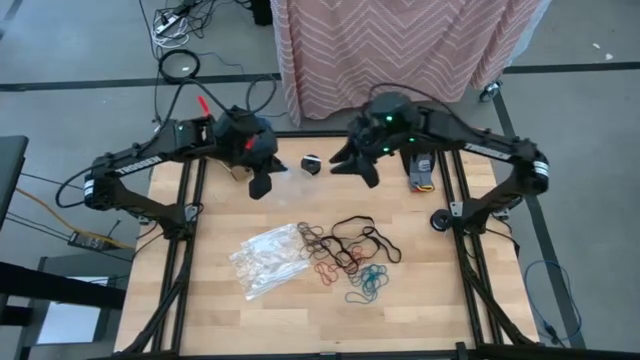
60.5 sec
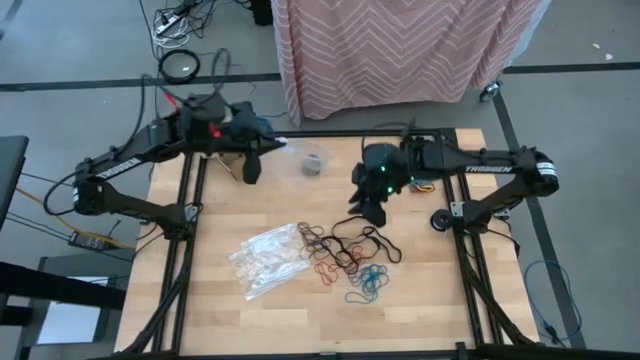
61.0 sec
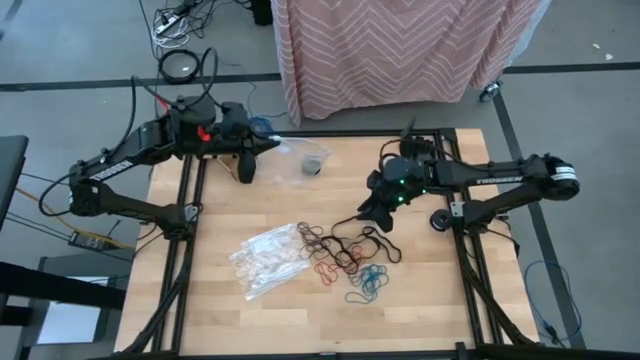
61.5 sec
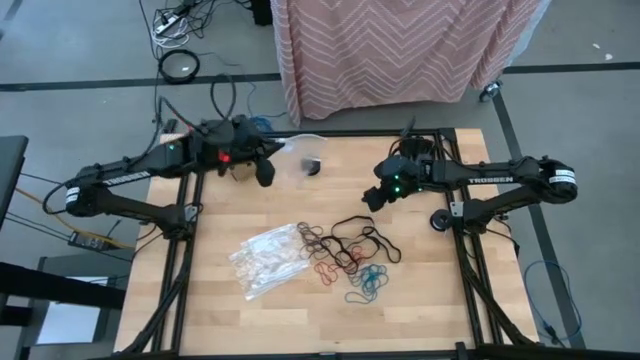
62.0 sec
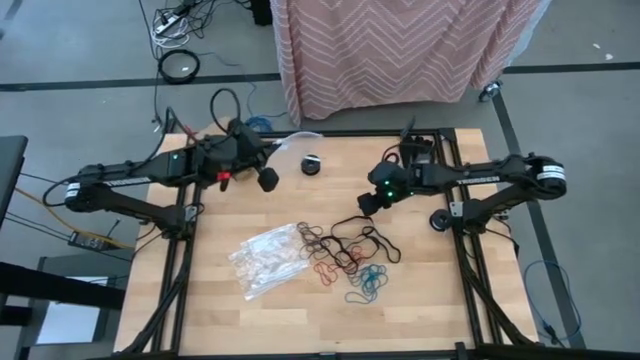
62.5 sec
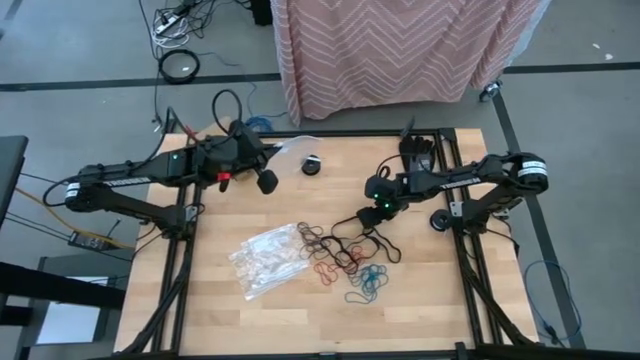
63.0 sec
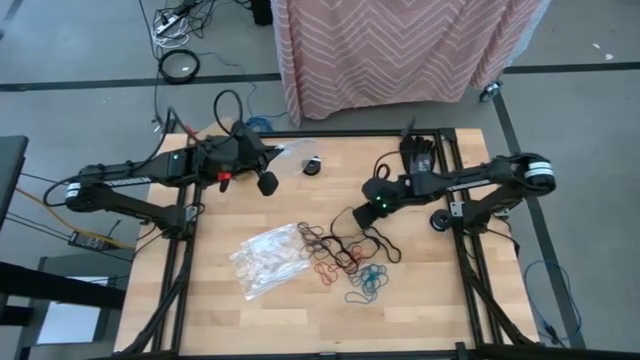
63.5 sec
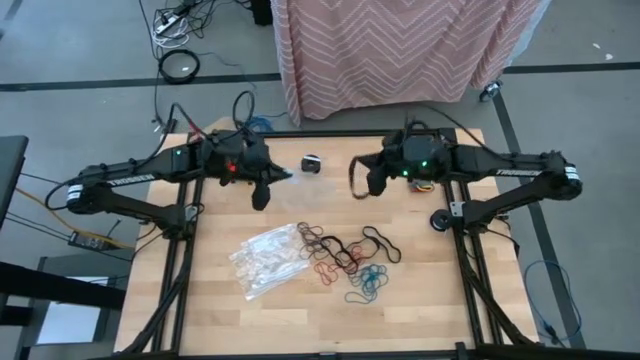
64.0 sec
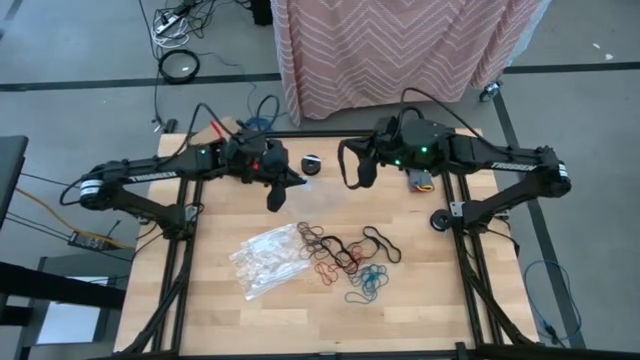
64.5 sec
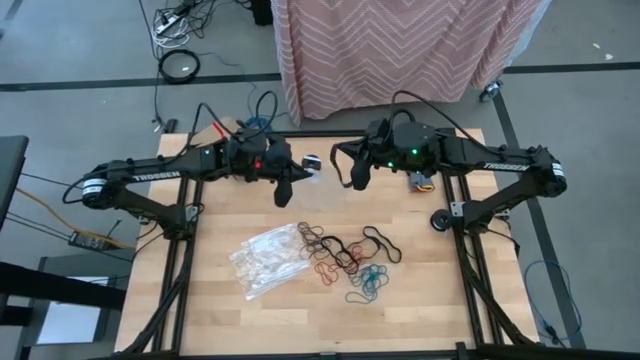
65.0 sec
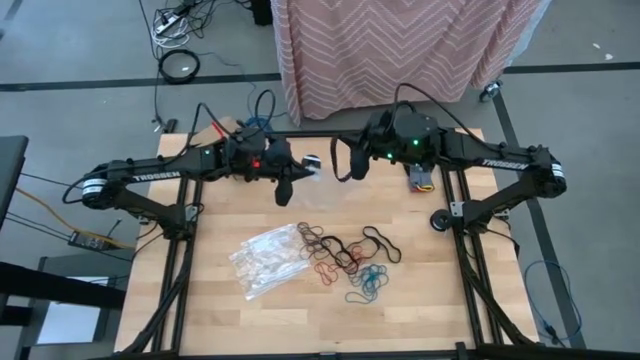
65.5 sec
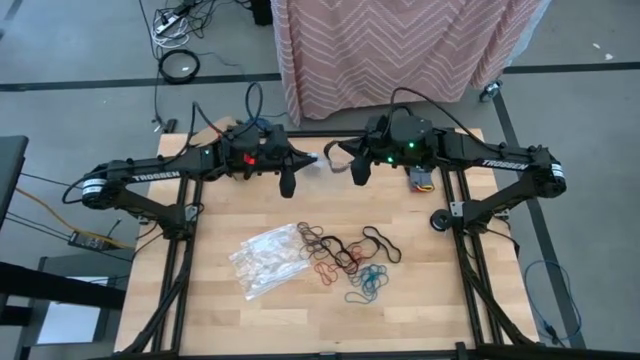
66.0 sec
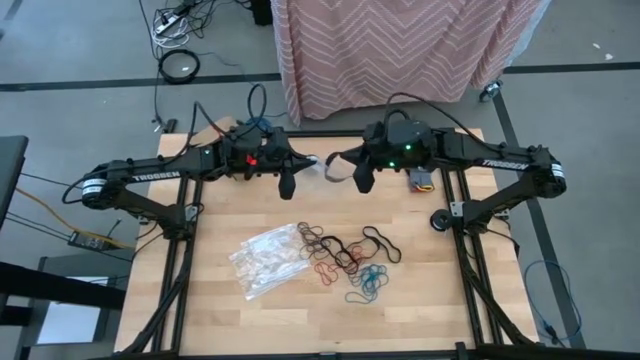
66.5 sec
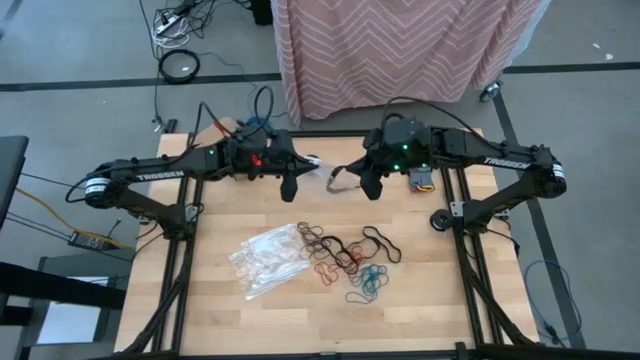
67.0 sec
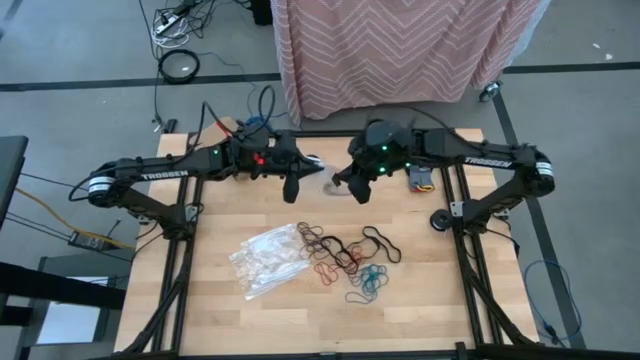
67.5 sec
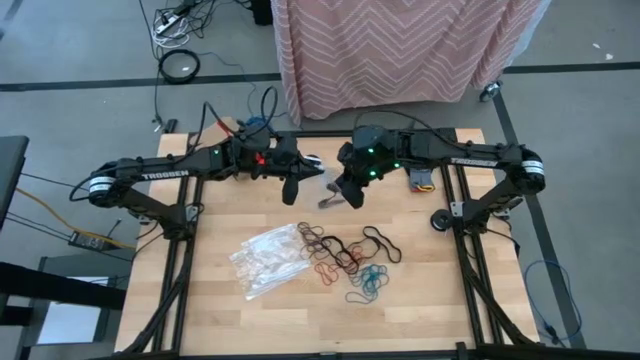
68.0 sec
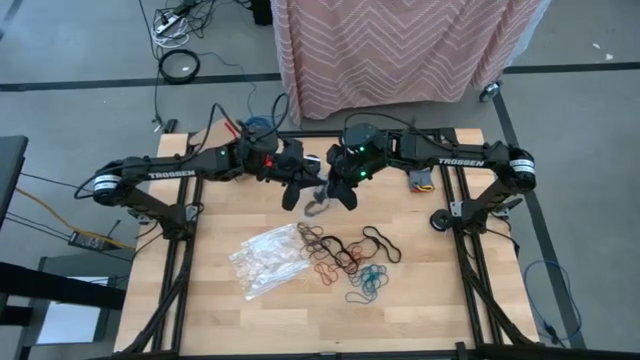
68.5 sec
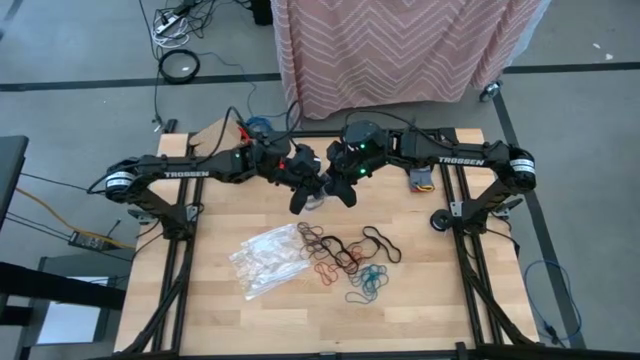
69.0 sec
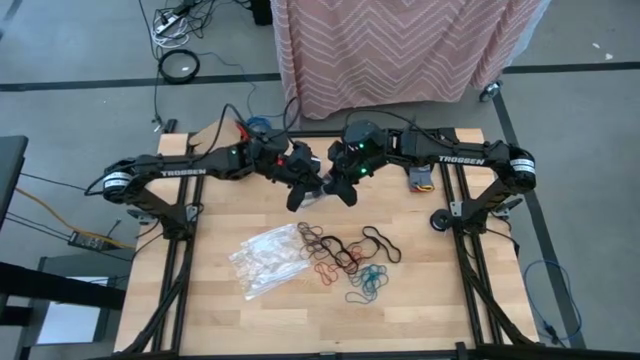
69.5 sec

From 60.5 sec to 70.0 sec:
Task: Sort rubber bands
Put the black rubber band into the transparent zip bag

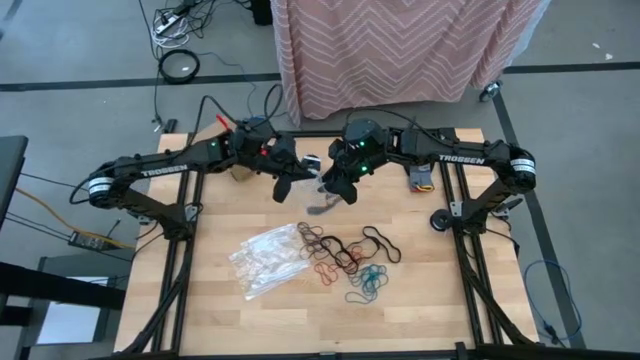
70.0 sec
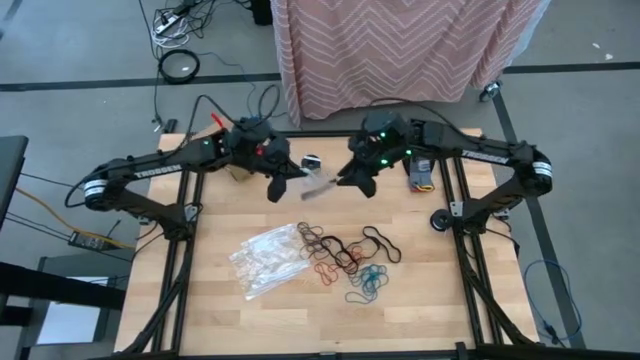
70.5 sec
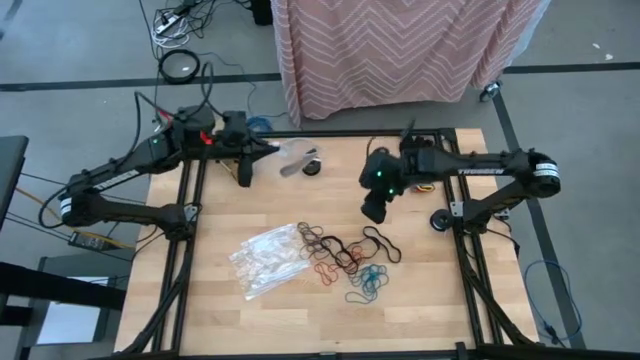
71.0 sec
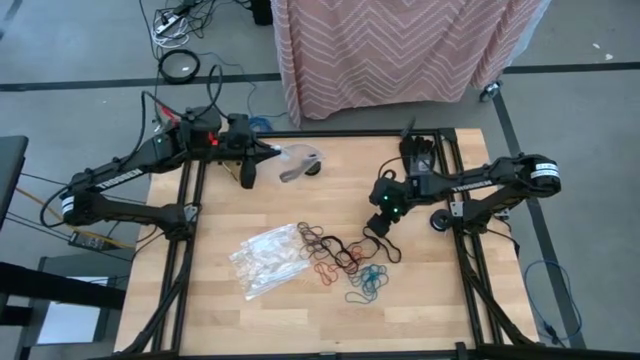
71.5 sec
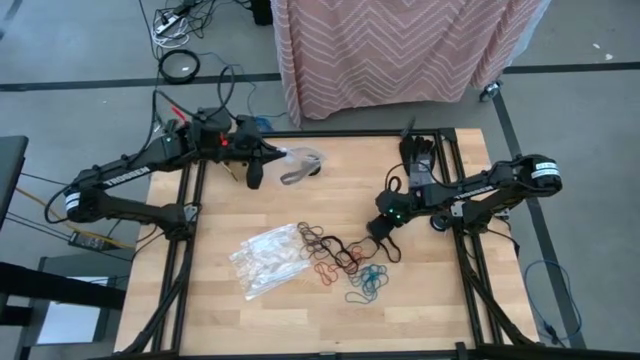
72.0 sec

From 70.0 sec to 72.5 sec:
Put the black rubber band into the transparent zip bag

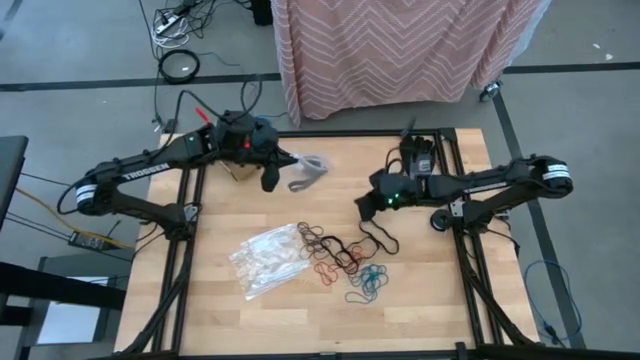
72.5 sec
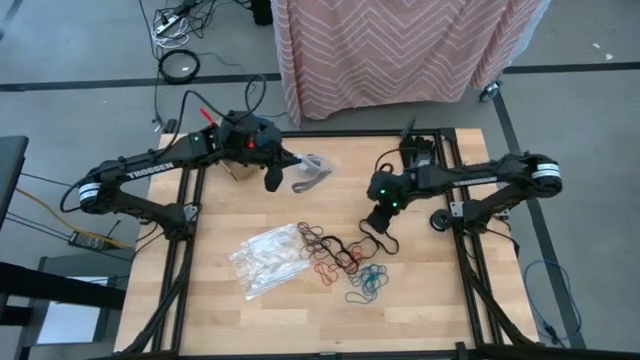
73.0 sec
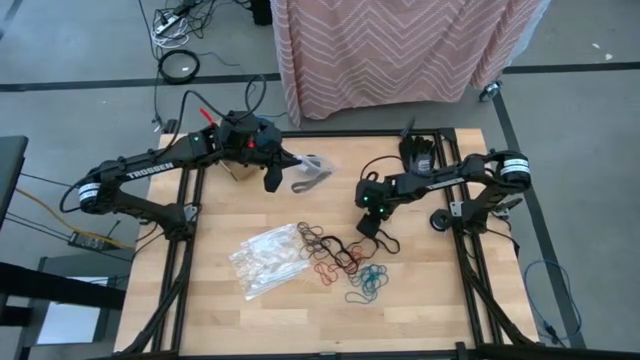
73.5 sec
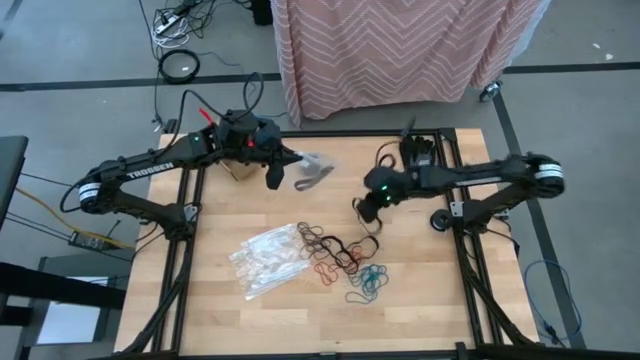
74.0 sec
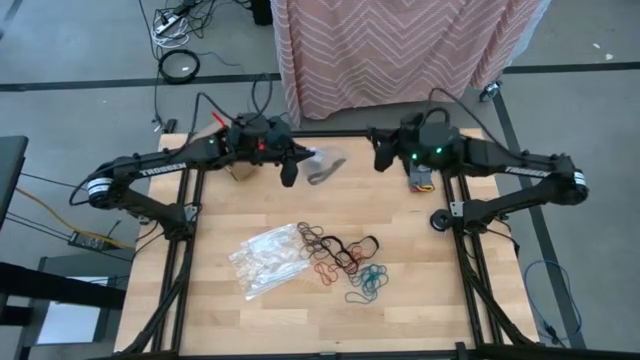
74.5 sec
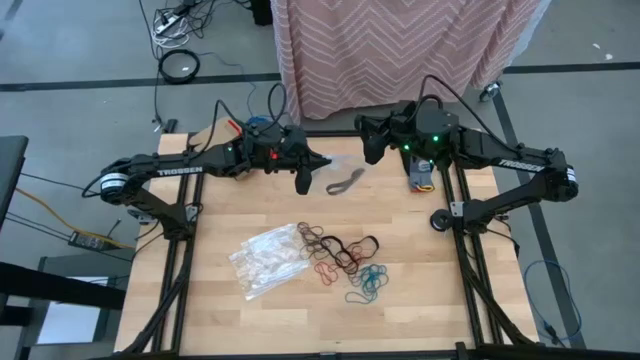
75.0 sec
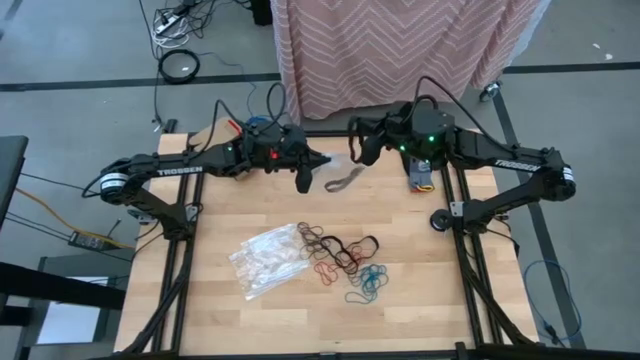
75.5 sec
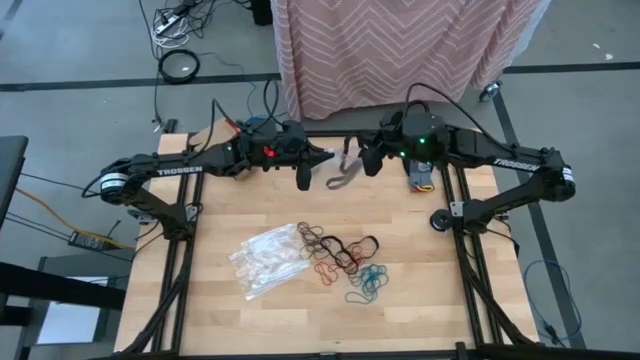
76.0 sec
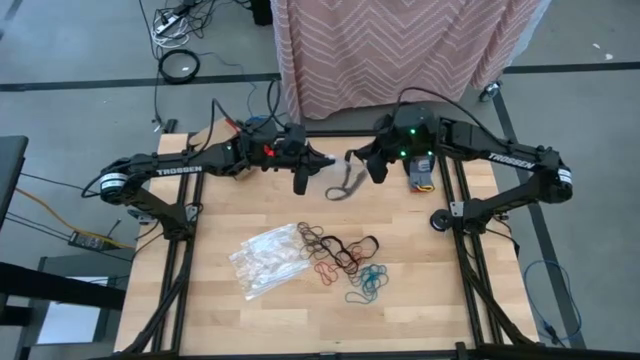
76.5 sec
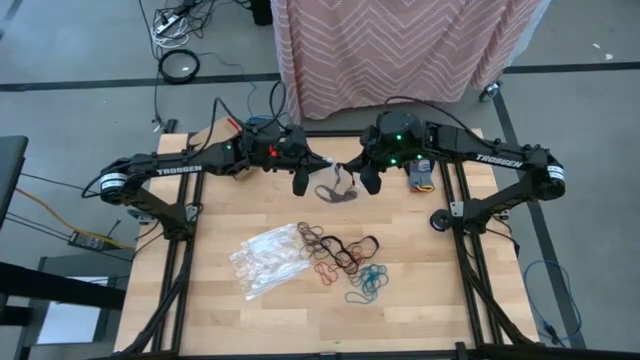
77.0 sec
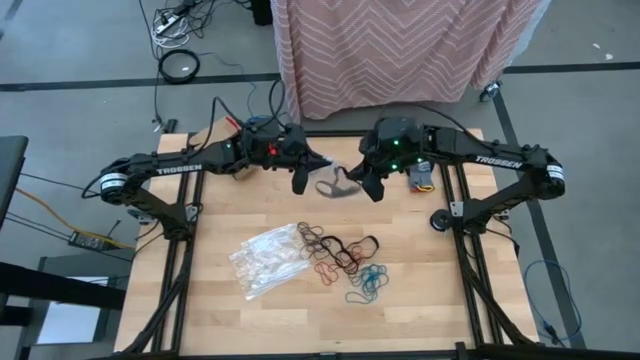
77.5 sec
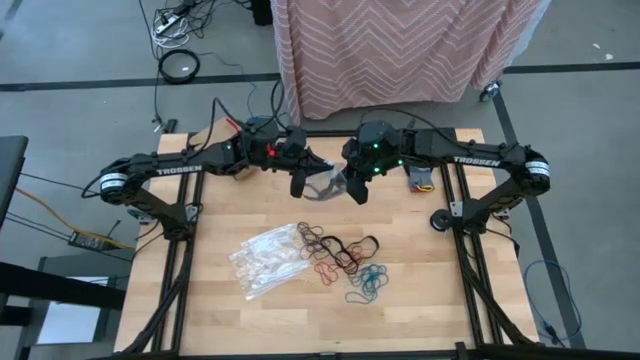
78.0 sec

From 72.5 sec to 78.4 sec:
Put the black rubber band into the transparent zip bag

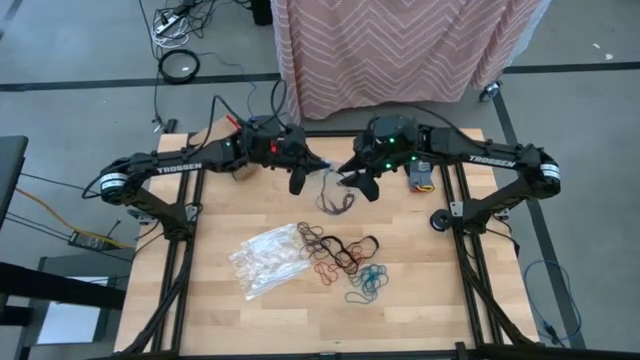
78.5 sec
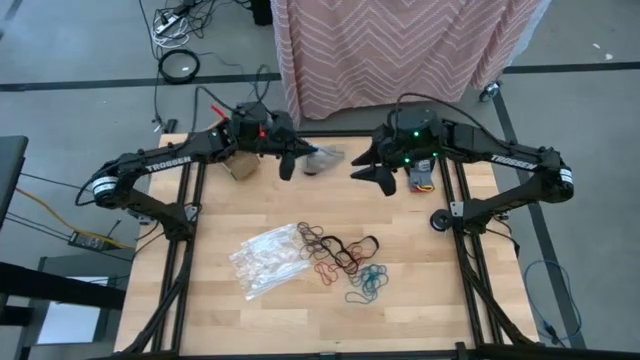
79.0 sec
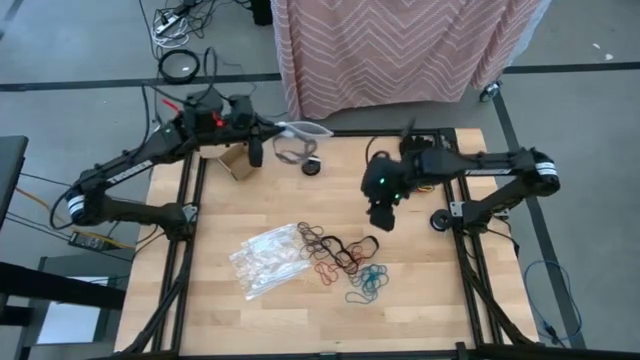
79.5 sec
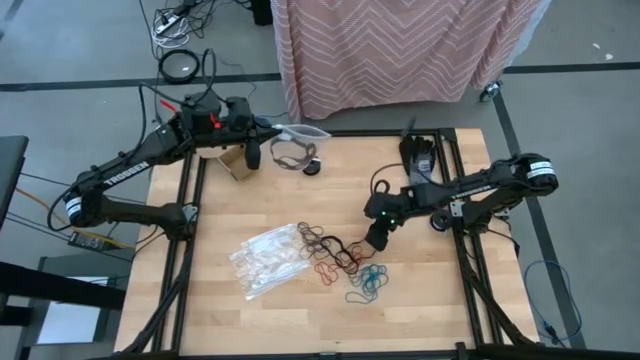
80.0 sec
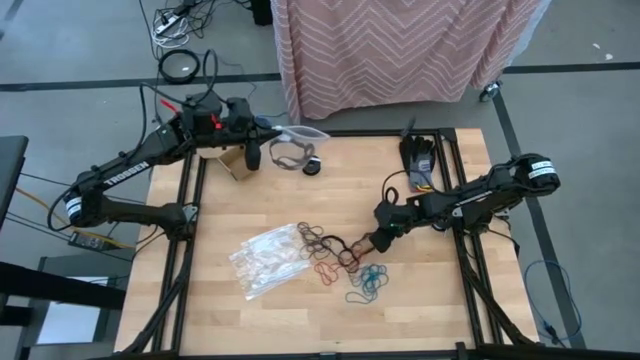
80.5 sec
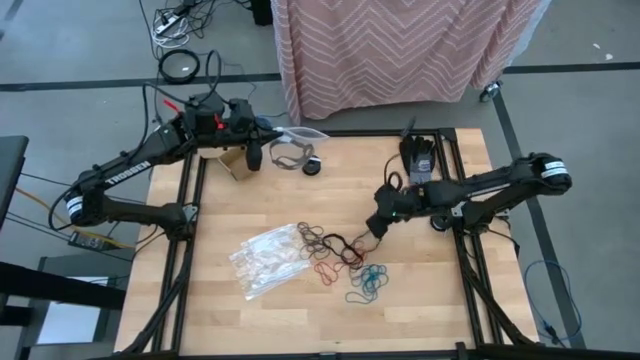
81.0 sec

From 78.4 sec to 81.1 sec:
Put the black rubber band into the transparent zip bag

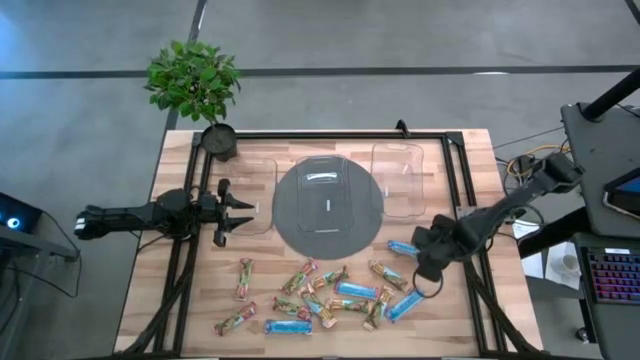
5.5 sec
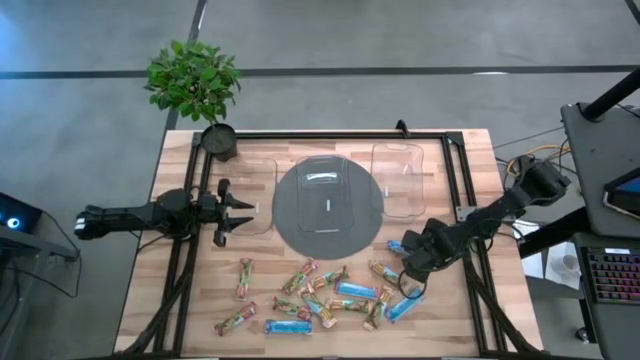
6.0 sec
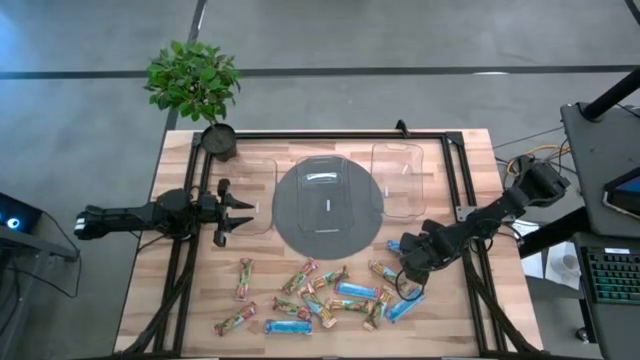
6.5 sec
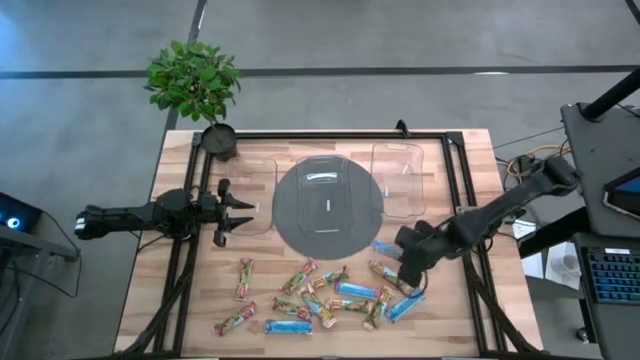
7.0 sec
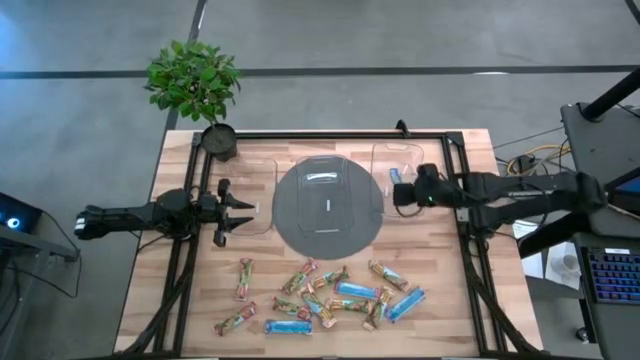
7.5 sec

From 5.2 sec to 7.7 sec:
Task: Pick and place Granola Bars by type
Put the blue granola bar into the right transparent bin
